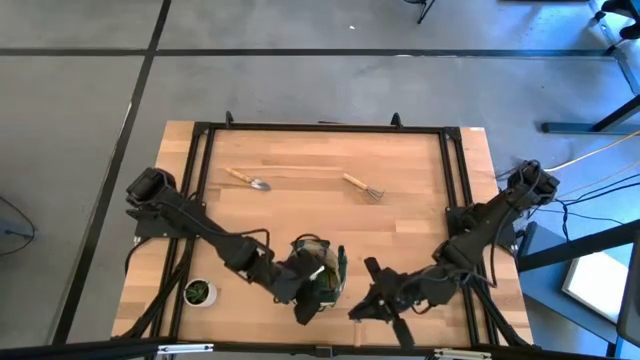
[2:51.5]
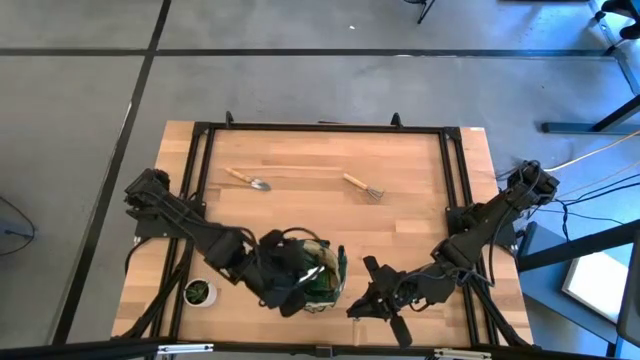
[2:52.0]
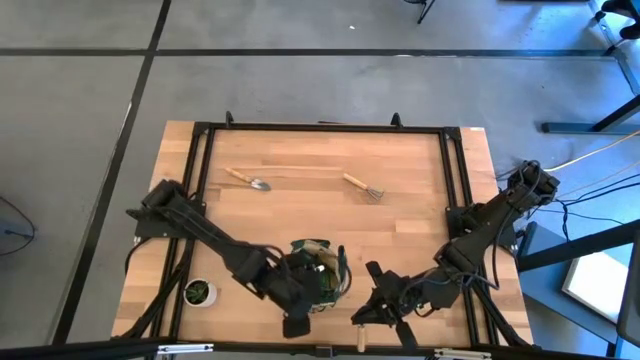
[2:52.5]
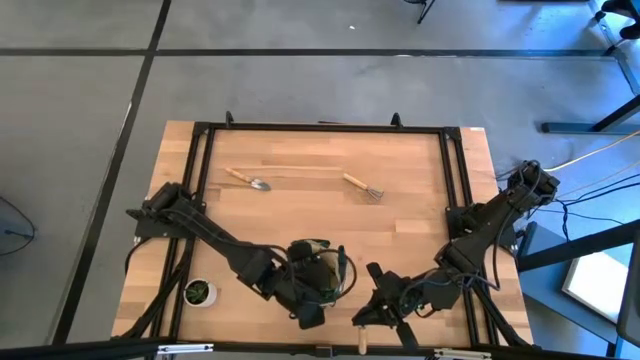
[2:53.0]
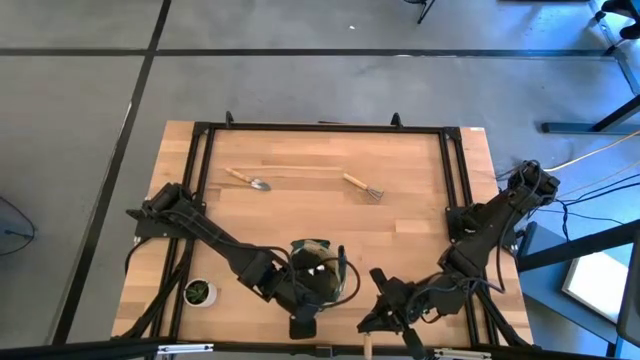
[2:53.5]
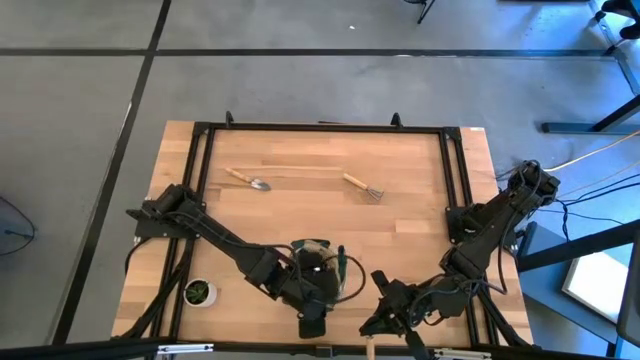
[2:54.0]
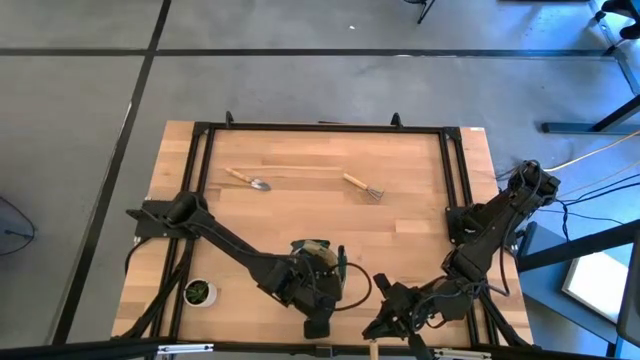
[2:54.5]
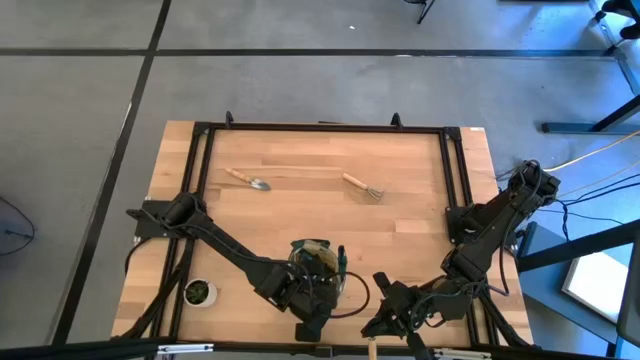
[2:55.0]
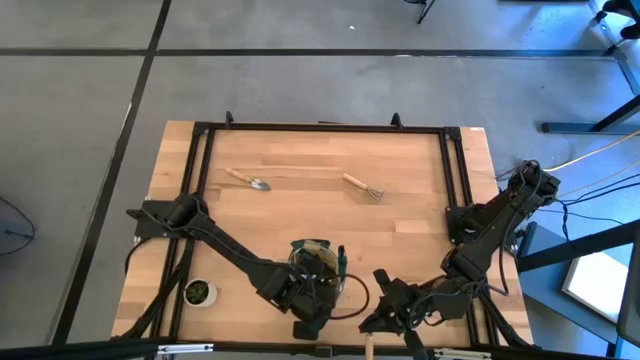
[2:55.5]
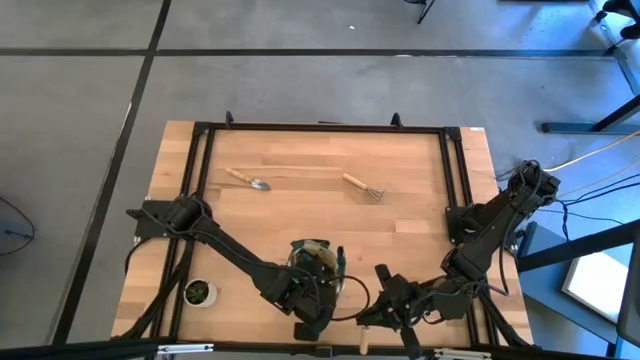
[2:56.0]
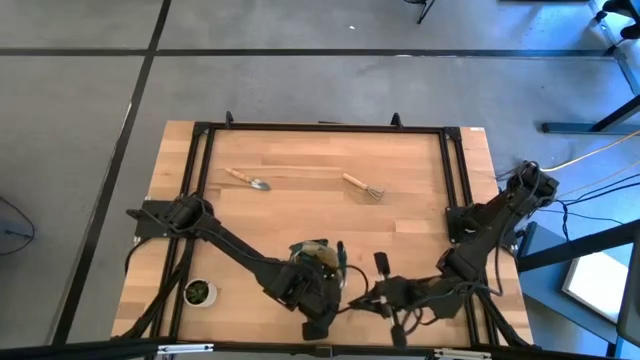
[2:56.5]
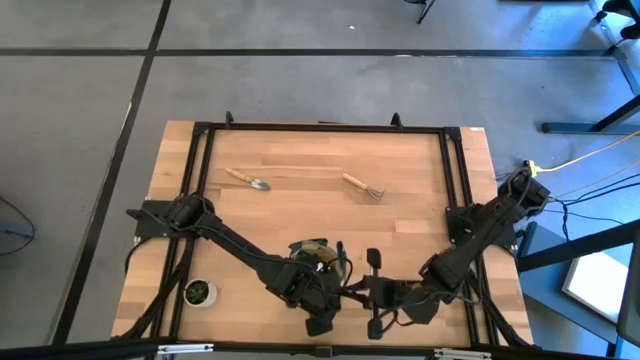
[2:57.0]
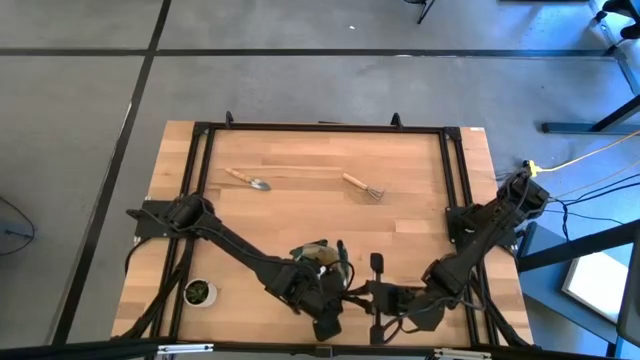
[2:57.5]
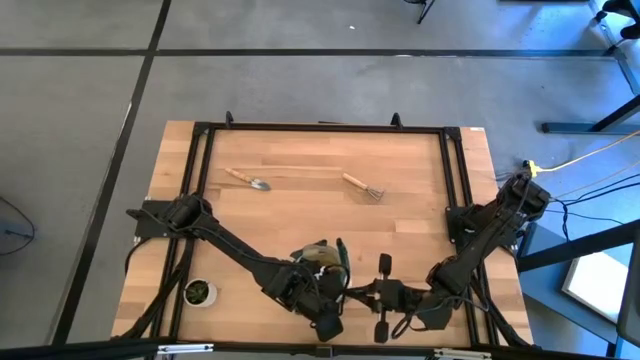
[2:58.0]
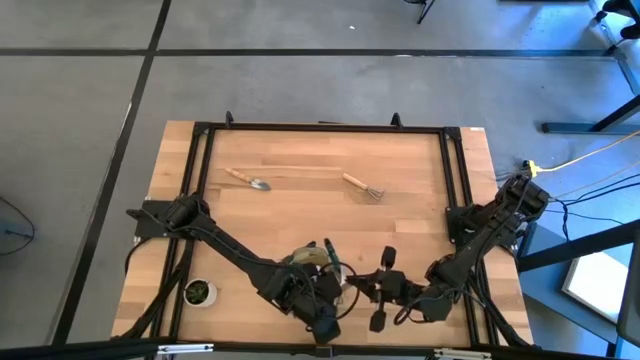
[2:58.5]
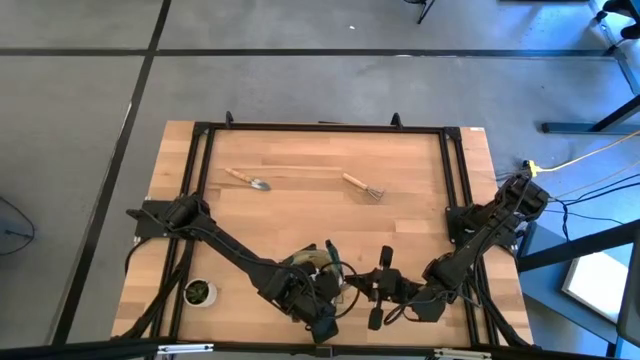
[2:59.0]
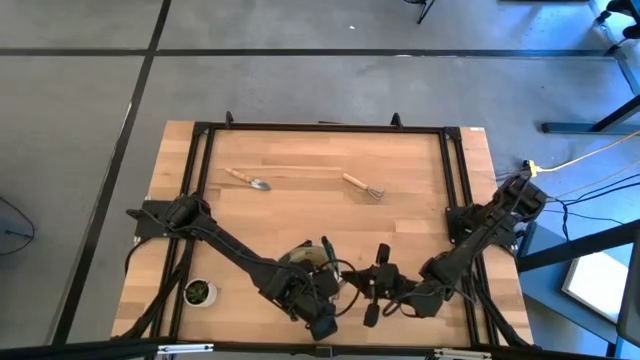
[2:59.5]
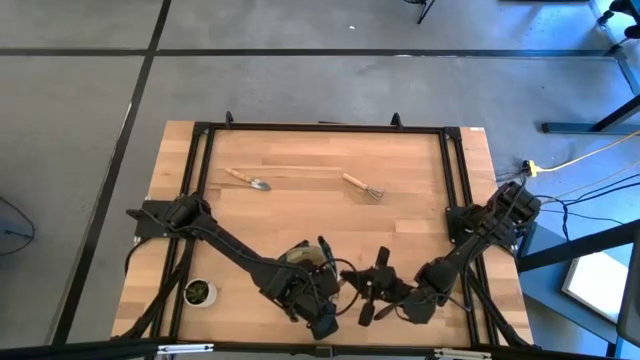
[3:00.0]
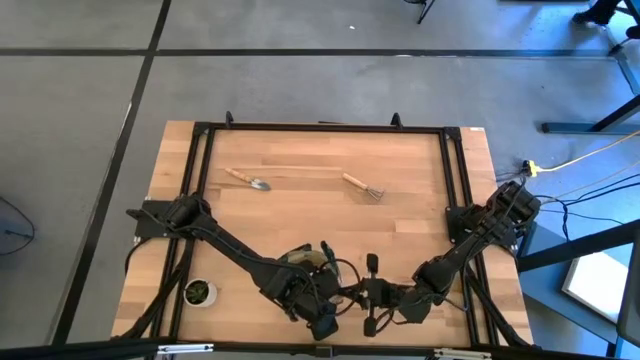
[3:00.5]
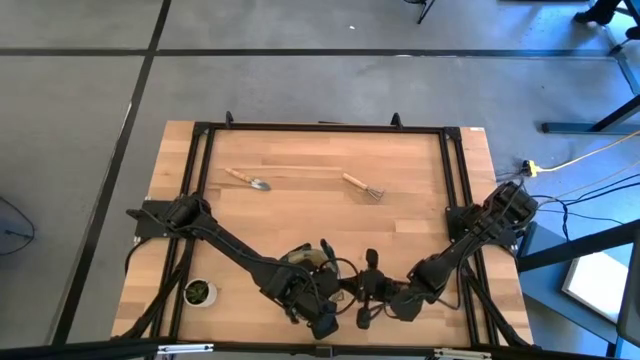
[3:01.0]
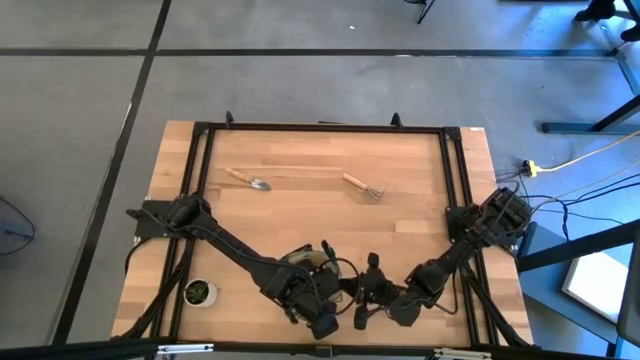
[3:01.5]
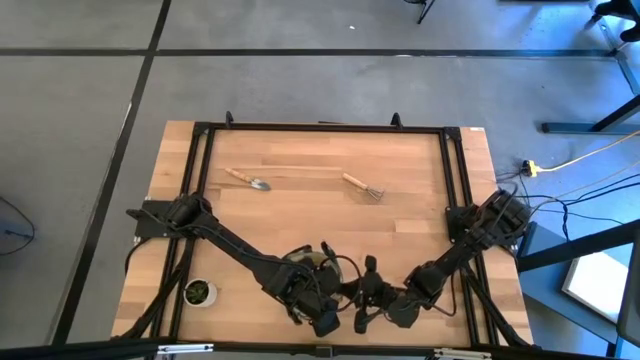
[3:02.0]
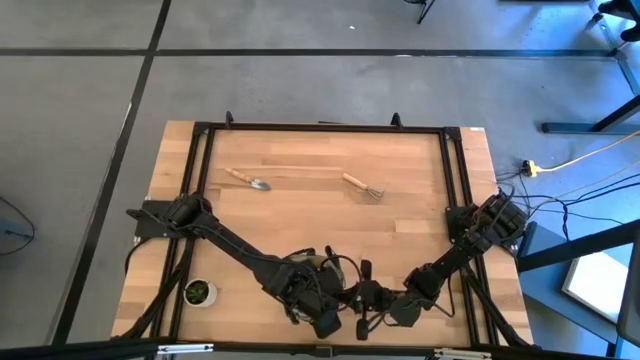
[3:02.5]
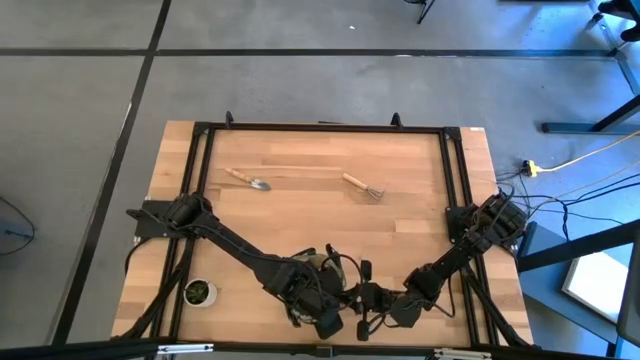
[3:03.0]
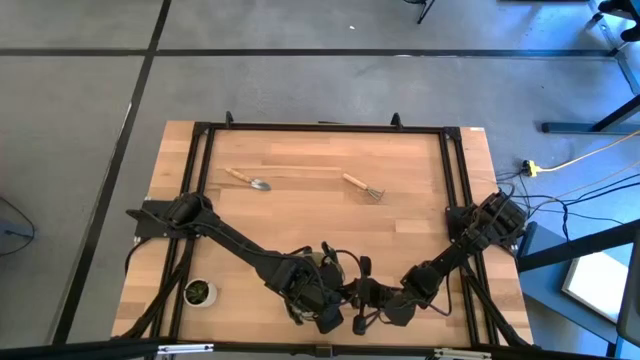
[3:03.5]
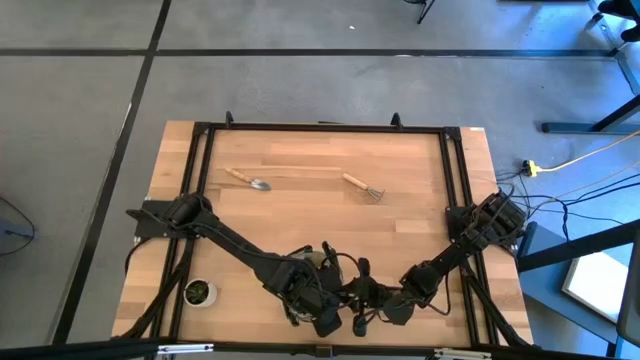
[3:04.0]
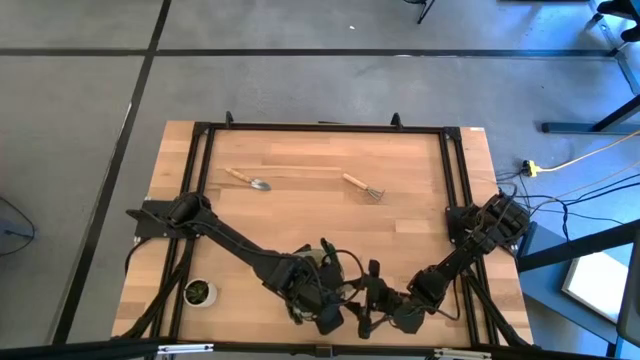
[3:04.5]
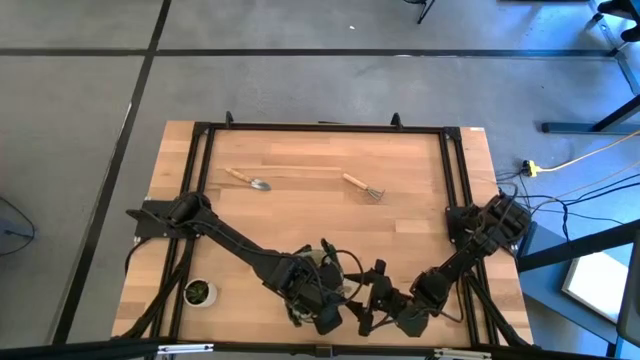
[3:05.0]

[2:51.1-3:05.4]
Task: Pick & Place Garden tools in Gardening bag
Put the right brown trowel into the gardening bag
